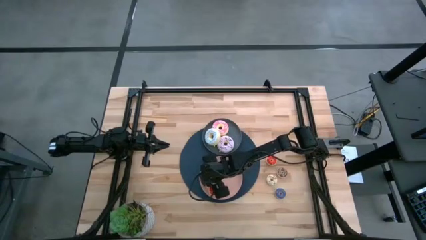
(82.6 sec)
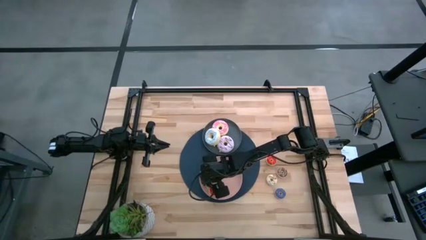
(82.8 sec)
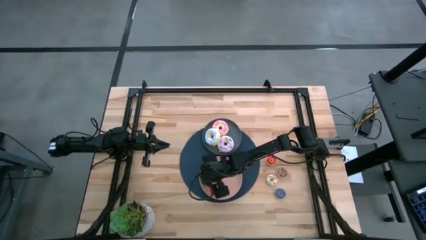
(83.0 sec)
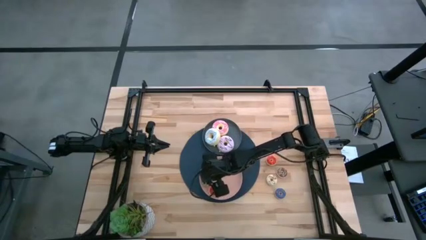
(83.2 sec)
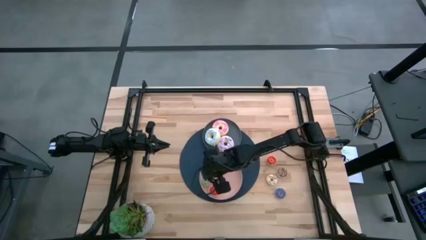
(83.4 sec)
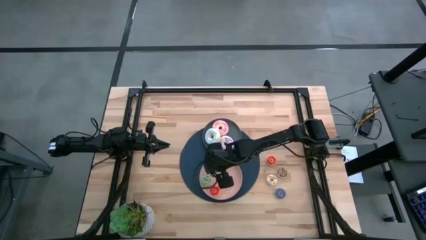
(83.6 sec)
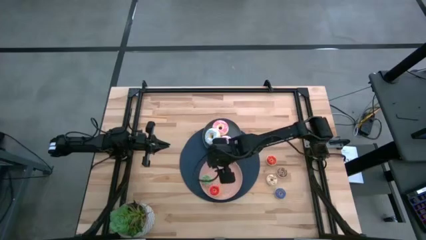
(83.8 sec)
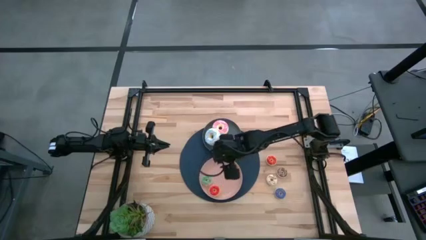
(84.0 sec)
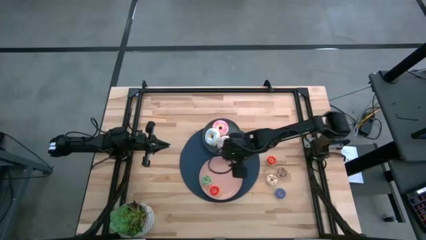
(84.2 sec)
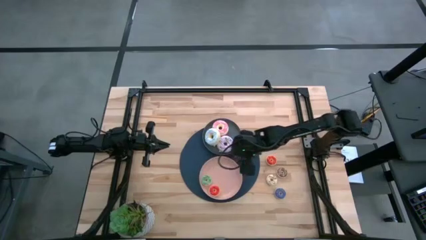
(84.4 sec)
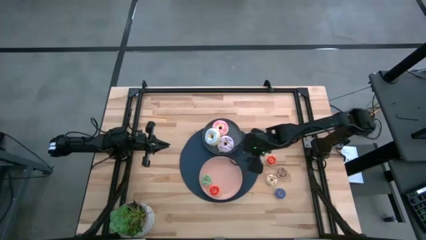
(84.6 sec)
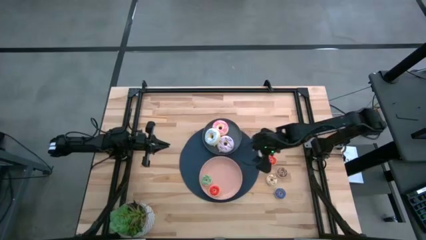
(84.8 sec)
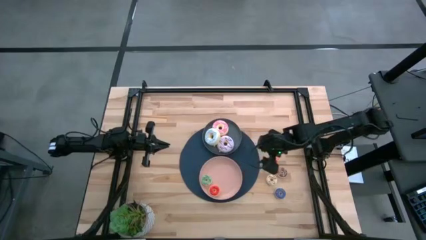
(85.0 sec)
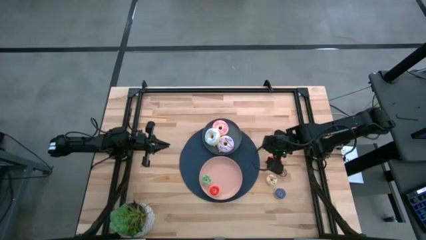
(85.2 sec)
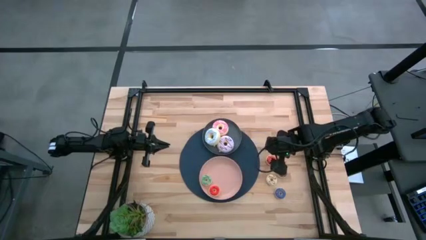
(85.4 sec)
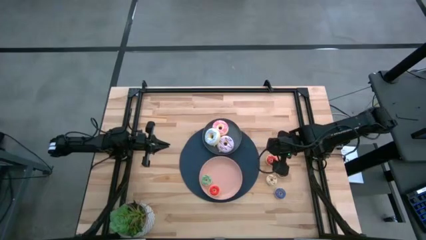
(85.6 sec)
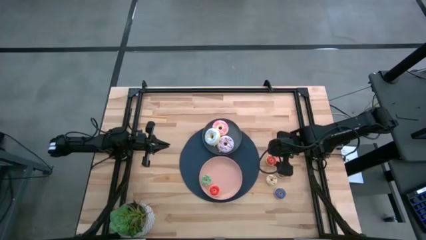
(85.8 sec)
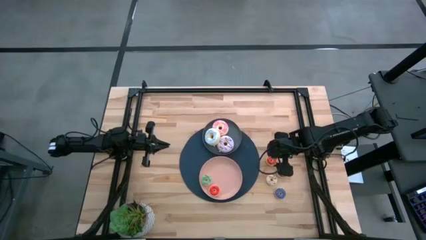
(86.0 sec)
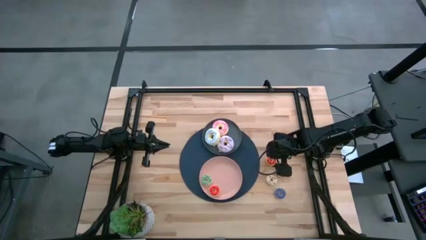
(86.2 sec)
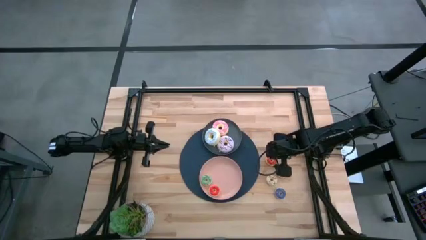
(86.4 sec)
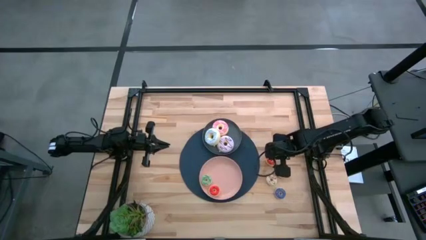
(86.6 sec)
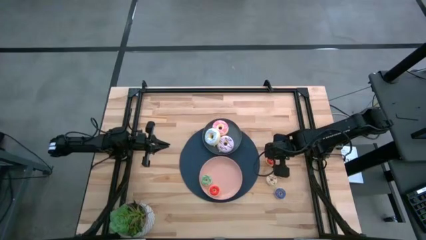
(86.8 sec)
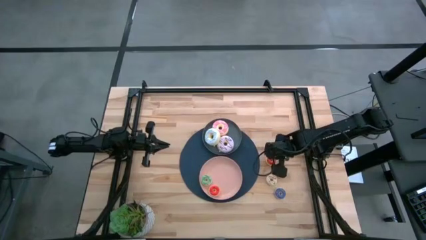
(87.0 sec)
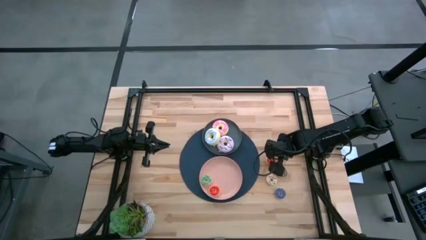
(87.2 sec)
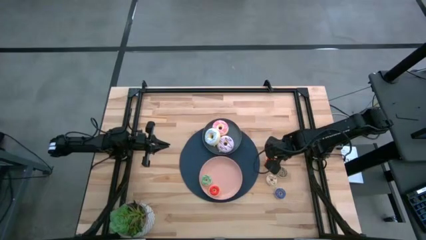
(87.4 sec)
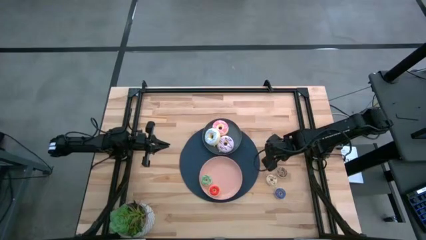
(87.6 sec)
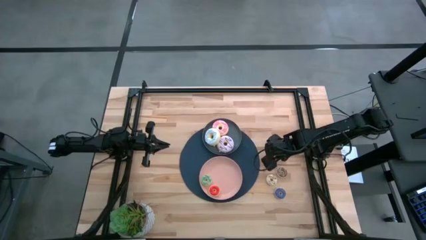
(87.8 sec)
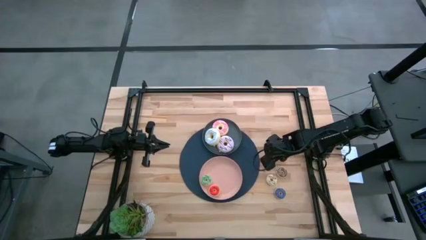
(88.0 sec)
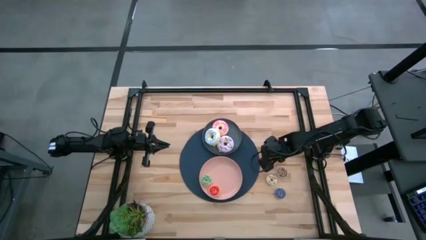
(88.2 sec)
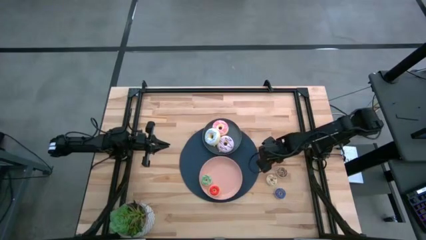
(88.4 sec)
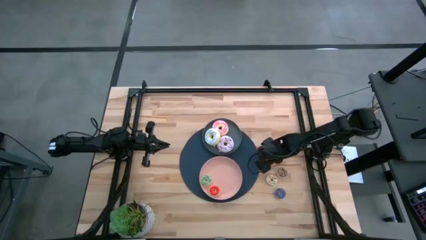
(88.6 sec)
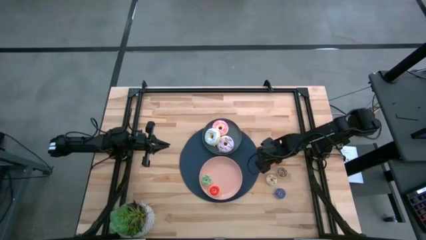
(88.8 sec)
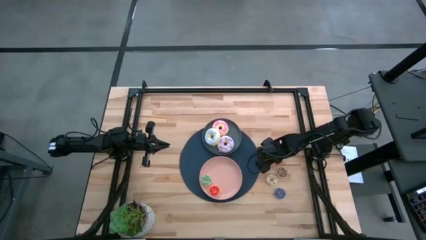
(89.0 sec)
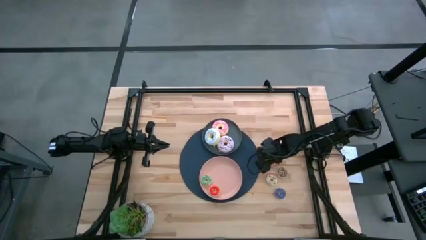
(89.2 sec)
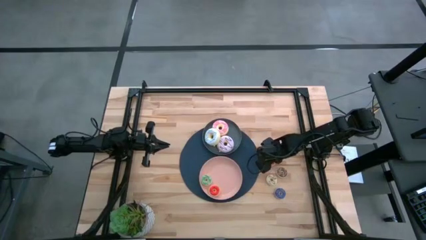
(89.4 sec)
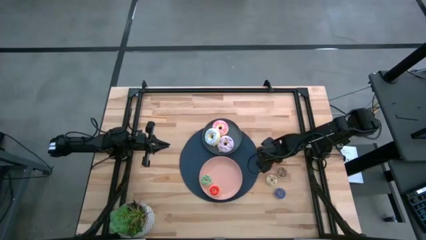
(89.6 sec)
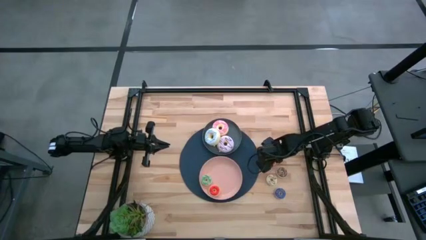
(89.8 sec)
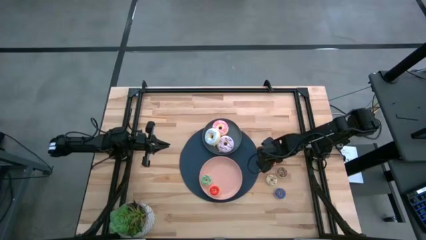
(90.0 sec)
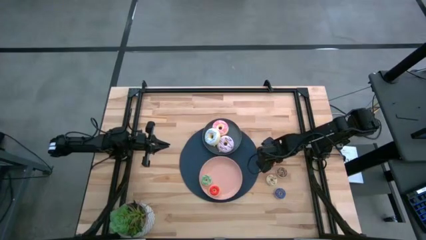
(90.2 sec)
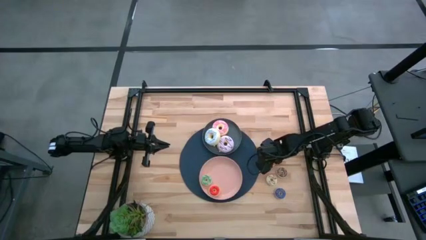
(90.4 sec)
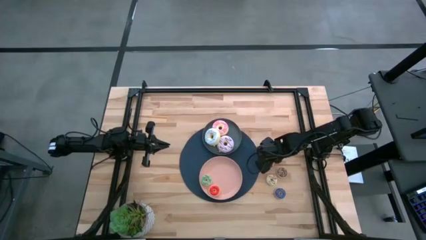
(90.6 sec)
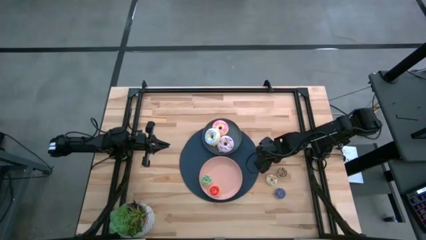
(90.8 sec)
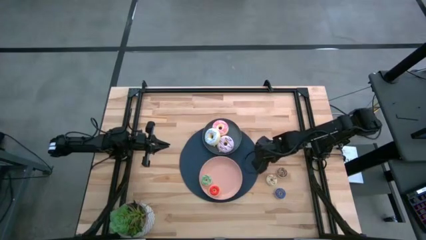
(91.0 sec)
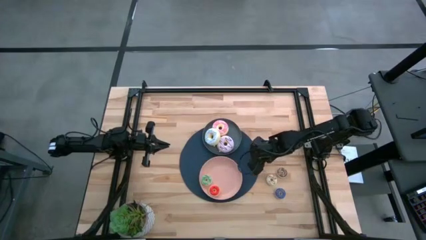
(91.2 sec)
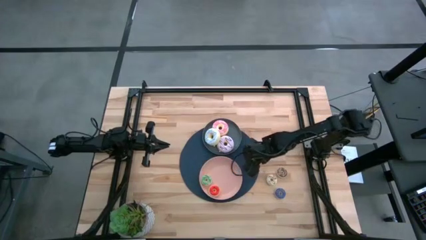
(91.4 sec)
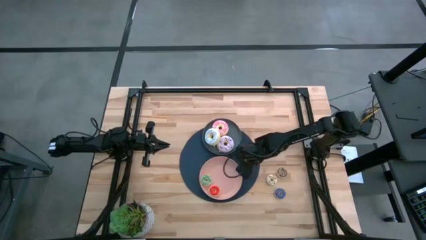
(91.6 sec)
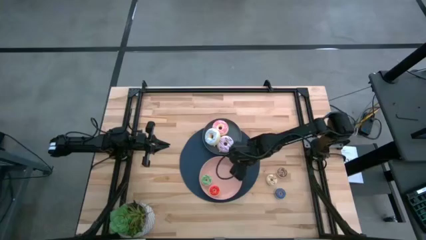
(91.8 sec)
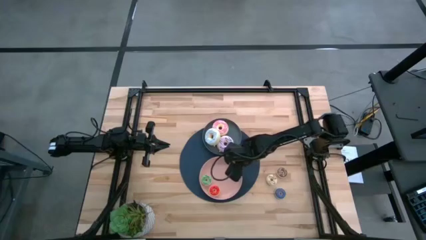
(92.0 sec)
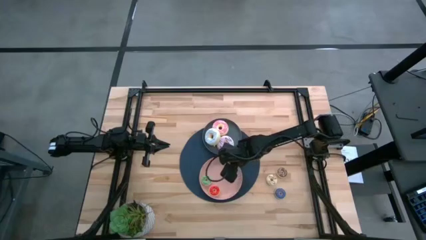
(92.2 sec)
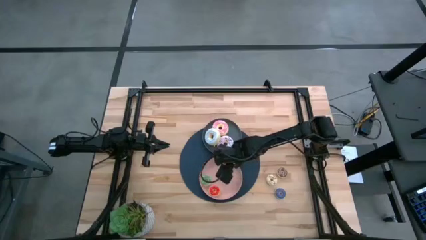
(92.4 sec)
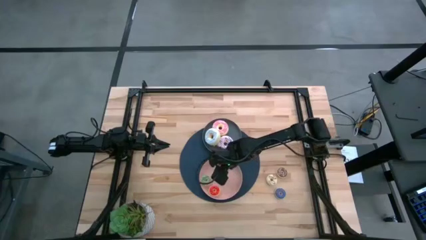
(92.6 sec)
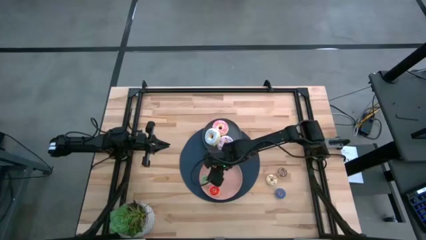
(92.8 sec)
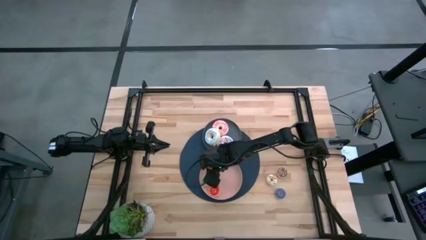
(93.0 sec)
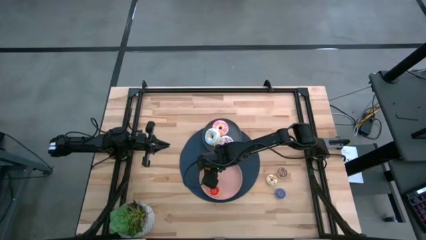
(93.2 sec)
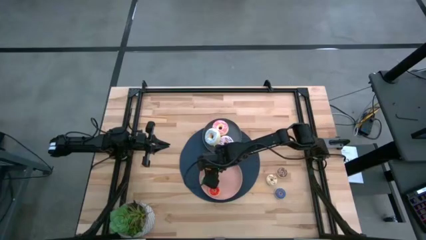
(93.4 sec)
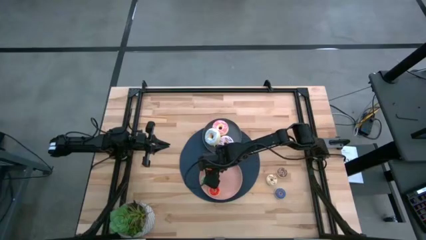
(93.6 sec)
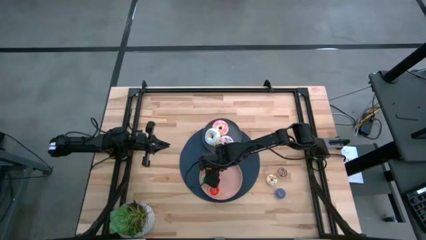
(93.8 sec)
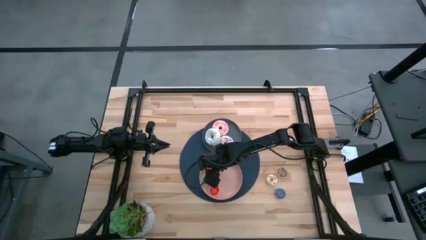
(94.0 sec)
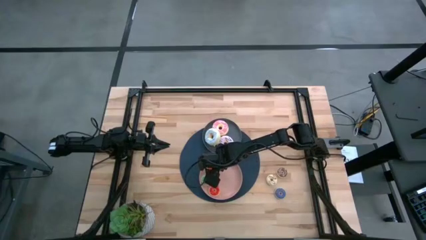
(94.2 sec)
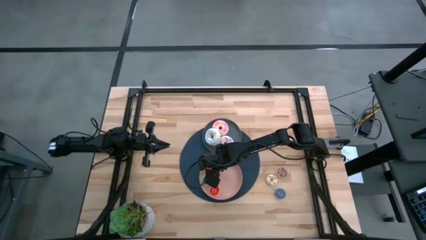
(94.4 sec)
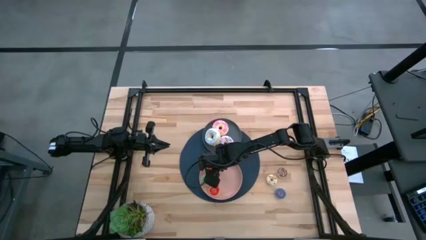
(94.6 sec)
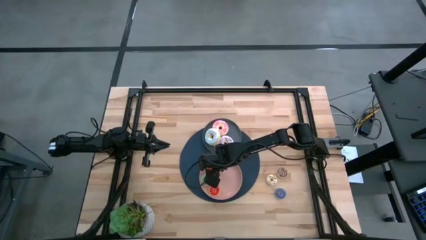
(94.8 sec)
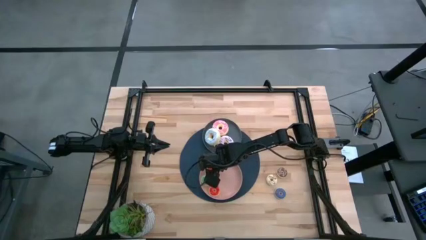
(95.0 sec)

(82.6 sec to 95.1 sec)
Task: Pick & Place donuts
Put the small orange doughnut into the pink plate

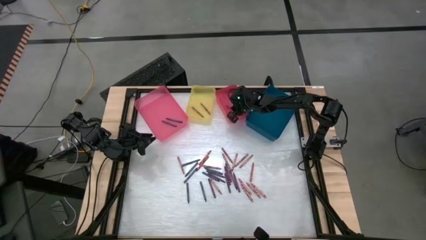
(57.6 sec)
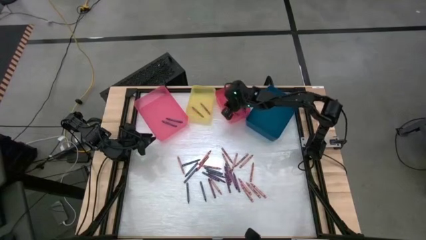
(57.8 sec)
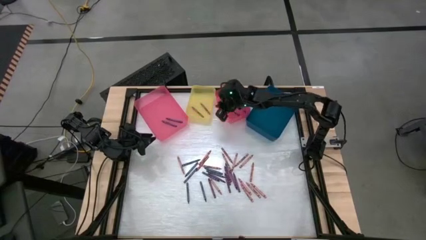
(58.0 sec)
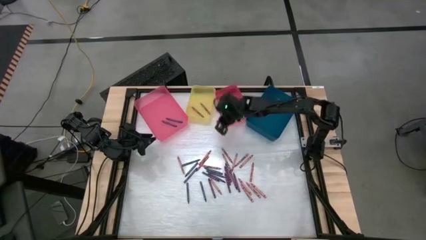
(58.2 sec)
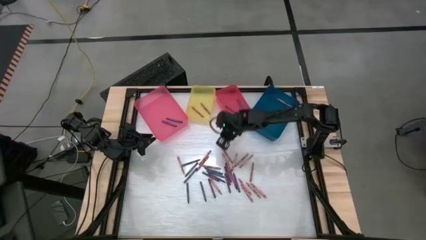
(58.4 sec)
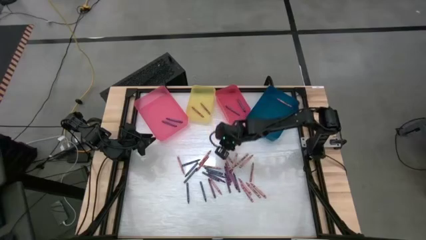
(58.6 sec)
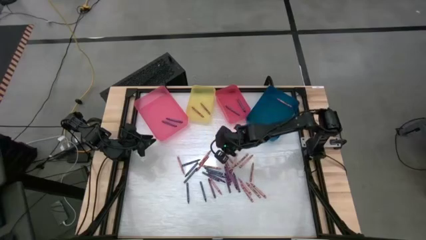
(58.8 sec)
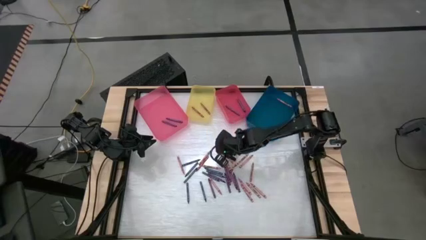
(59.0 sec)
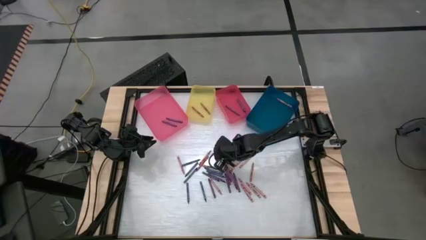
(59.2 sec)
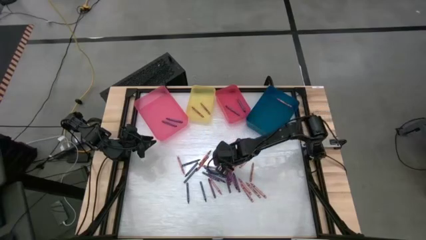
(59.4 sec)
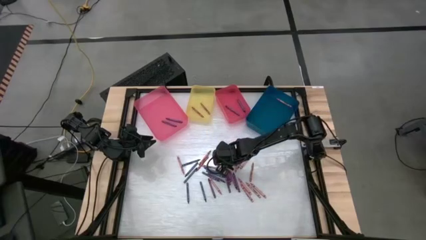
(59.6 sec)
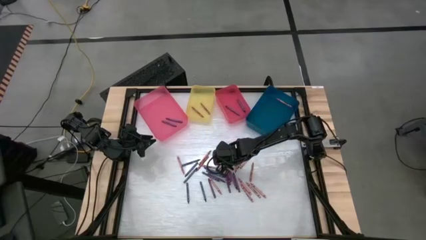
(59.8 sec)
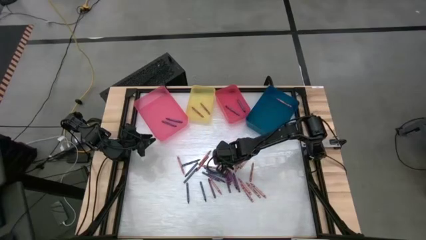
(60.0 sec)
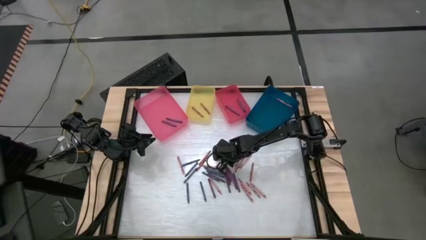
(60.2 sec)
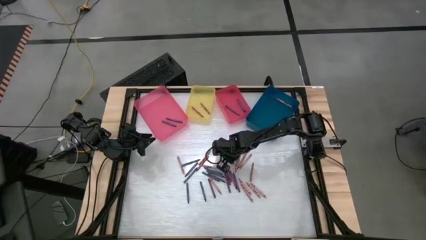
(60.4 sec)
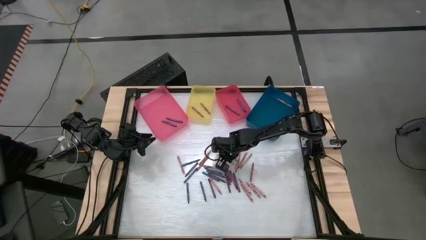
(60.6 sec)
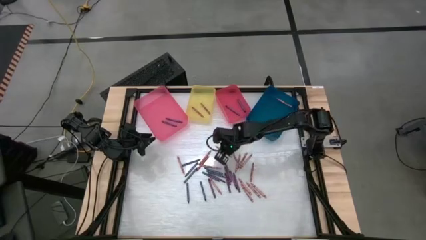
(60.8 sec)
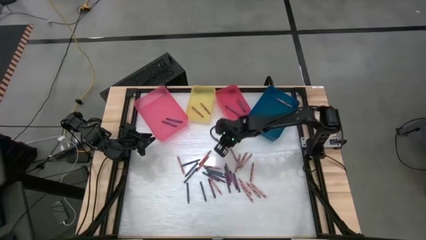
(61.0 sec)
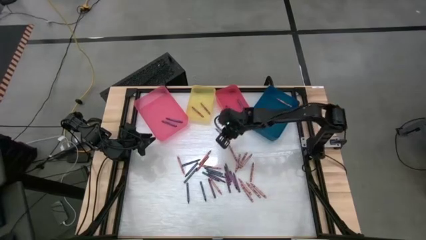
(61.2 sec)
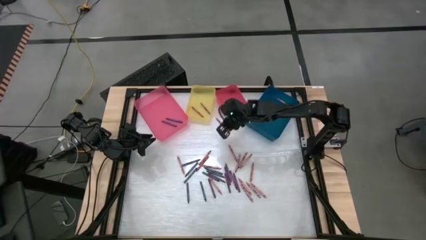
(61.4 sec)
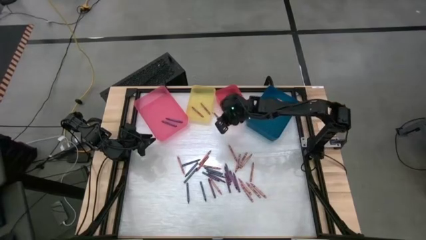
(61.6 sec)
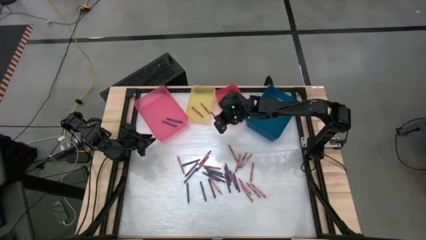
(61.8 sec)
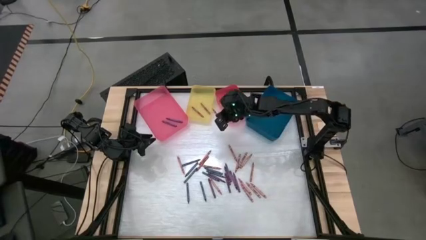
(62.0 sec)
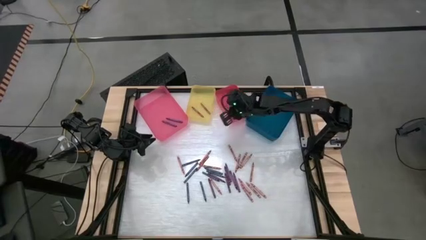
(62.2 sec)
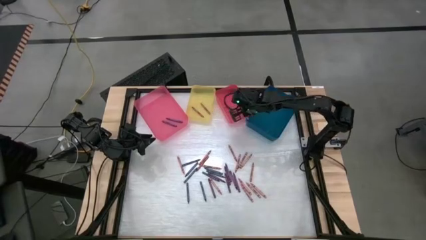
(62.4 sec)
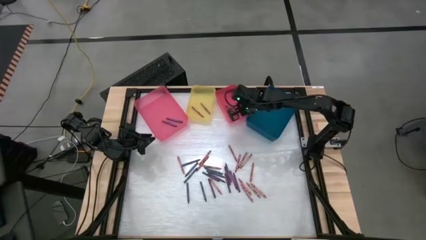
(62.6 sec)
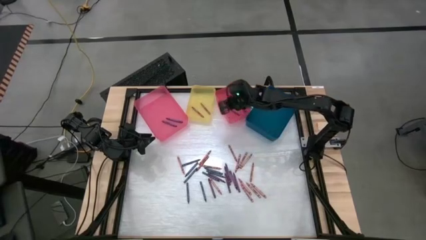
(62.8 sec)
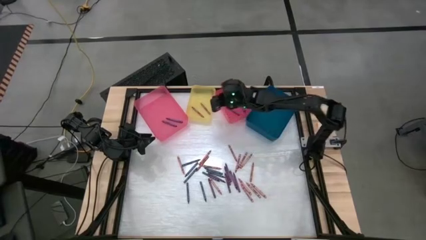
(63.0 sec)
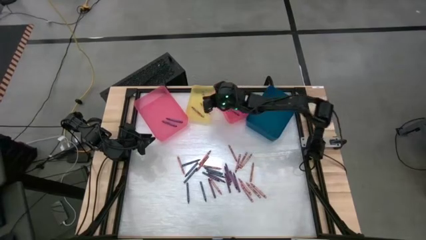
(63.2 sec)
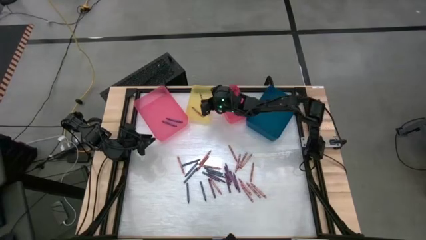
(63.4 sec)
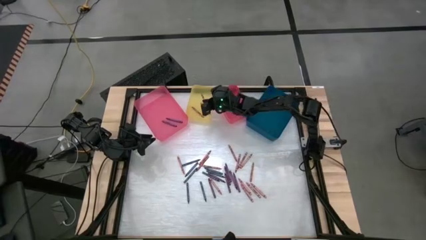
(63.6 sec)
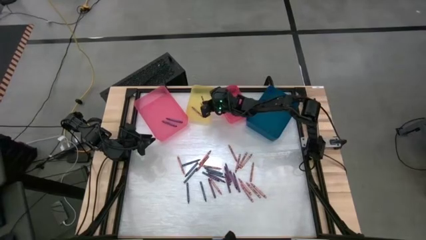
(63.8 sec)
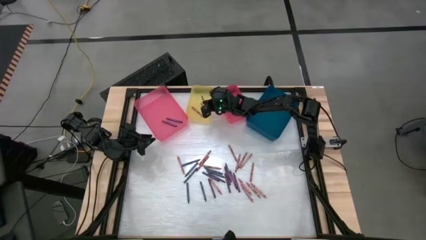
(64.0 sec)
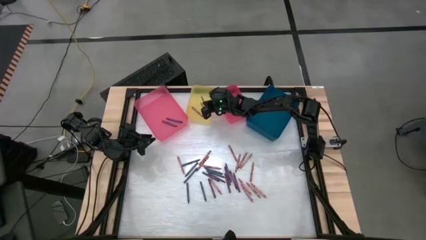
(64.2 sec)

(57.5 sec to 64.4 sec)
Task: Sort crayons
Put the red crayon into the yellow bin
